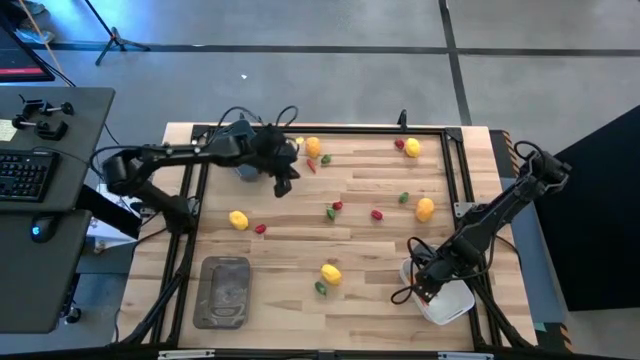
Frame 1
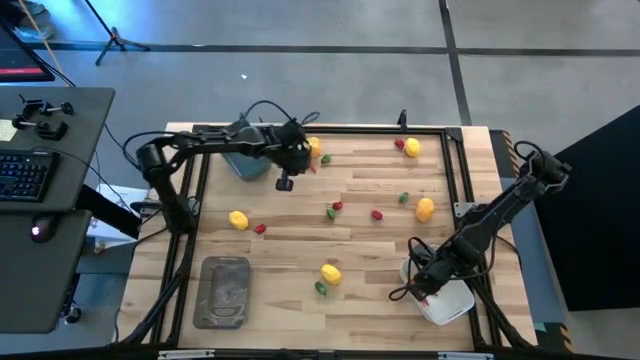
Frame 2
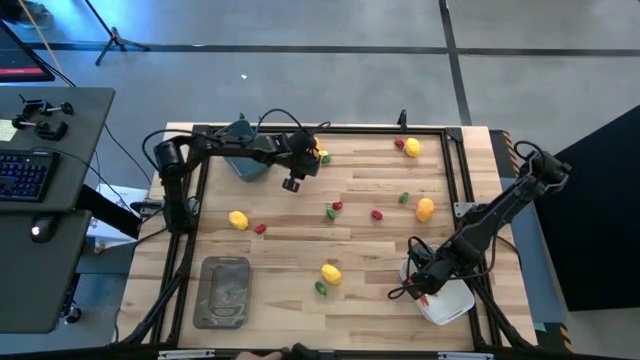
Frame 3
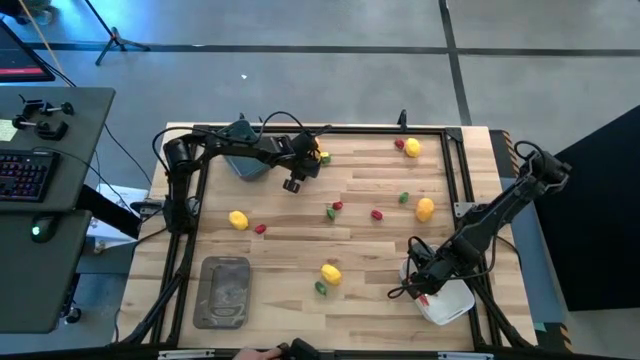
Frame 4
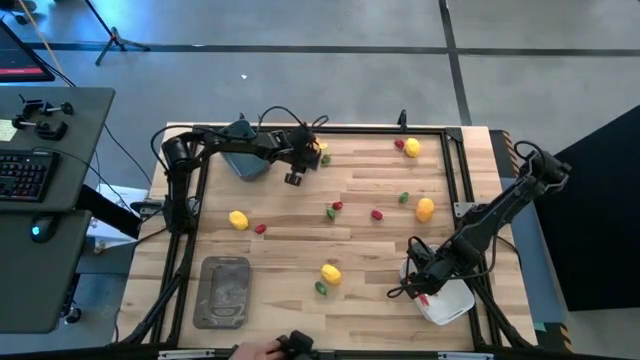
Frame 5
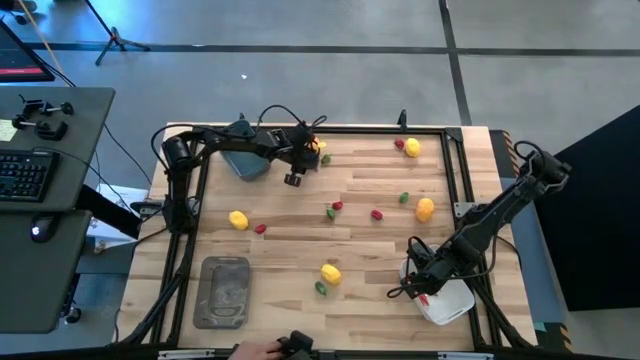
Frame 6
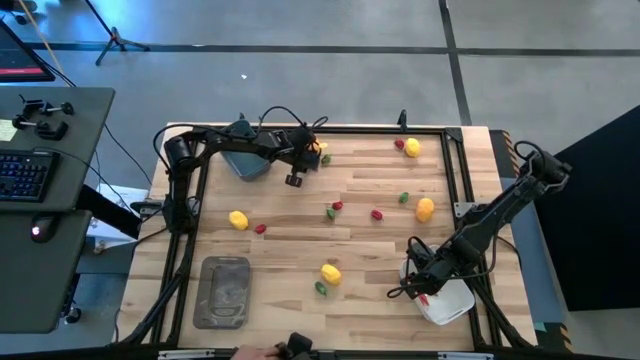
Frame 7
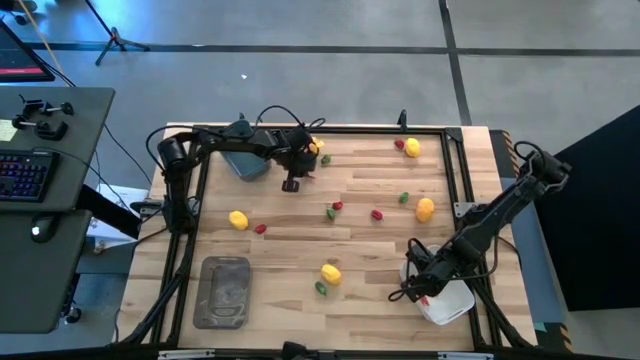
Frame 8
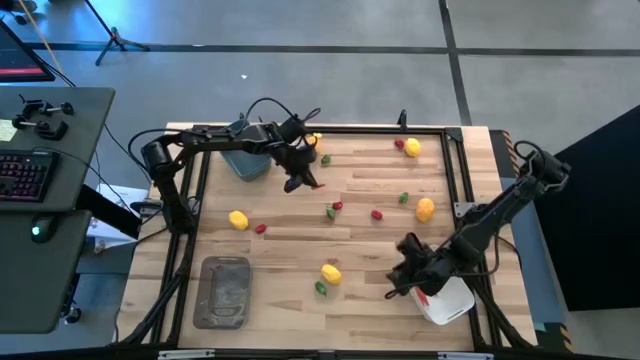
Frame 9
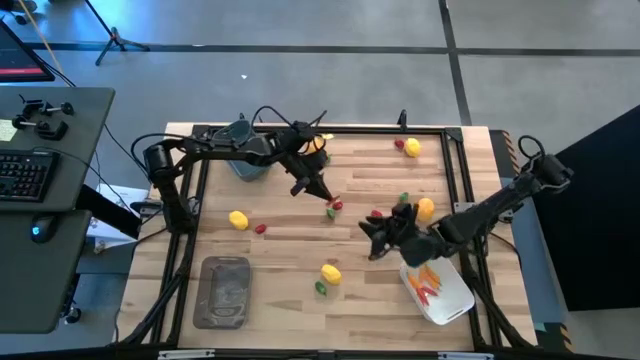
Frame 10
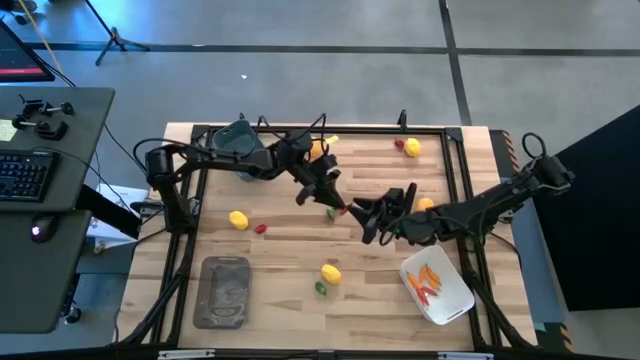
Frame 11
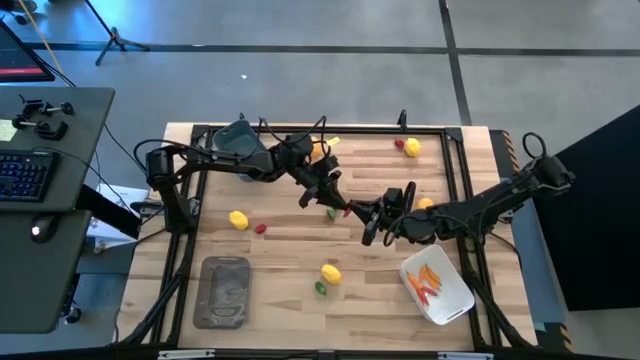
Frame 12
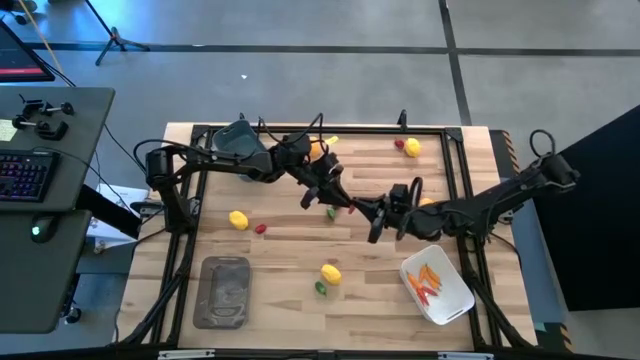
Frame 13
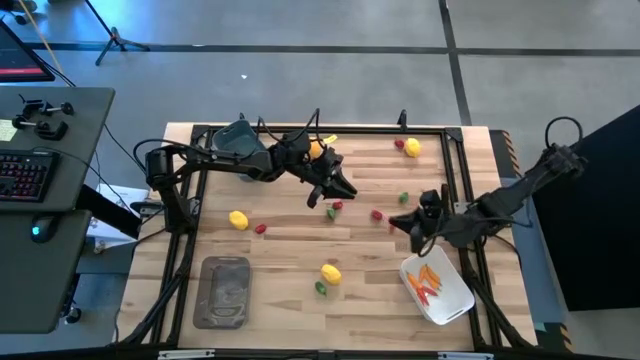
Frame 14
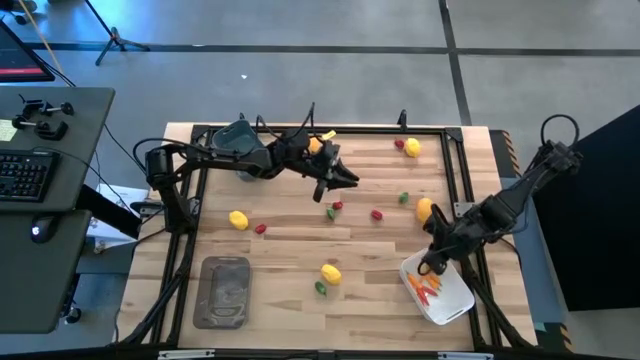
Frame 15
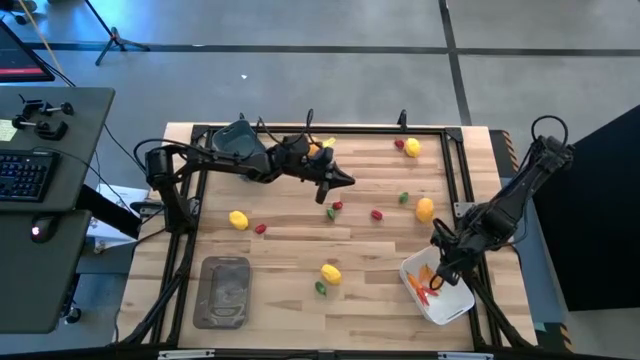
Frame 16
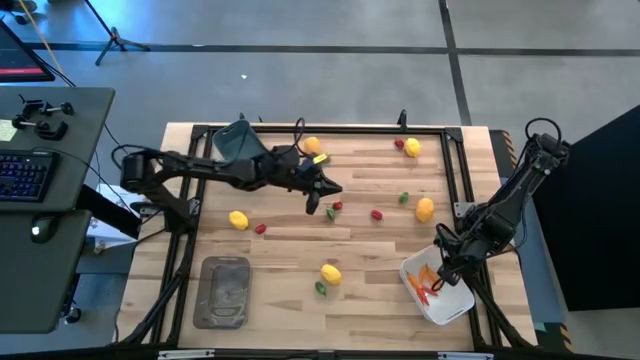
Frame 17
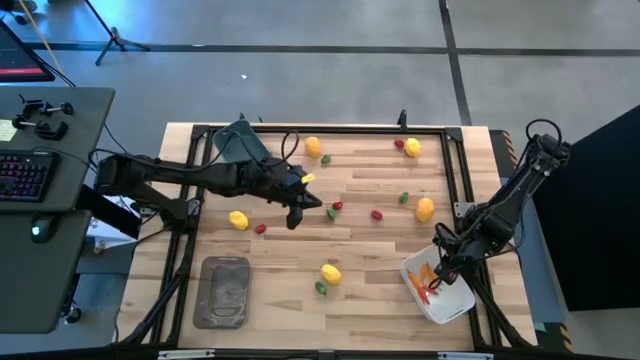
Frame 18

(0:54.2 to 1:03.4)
Task: Sort produce into baskets
Put the dark orange chili pepper into the white bin

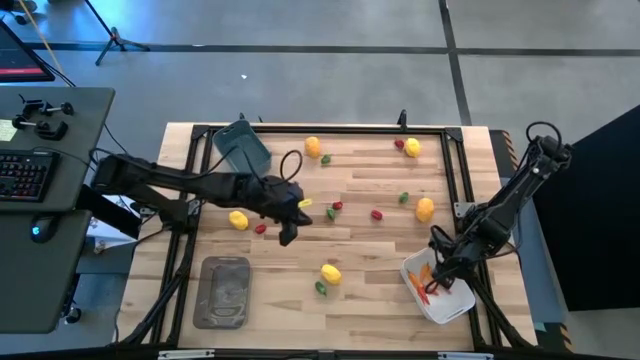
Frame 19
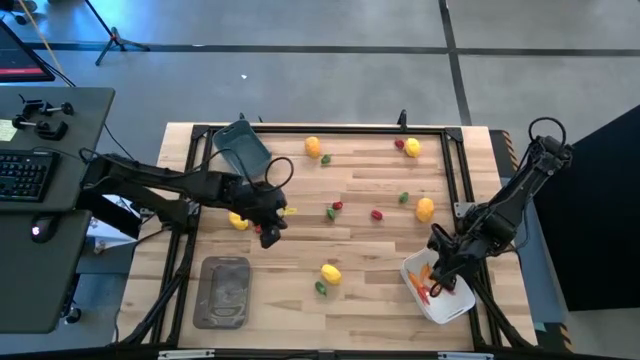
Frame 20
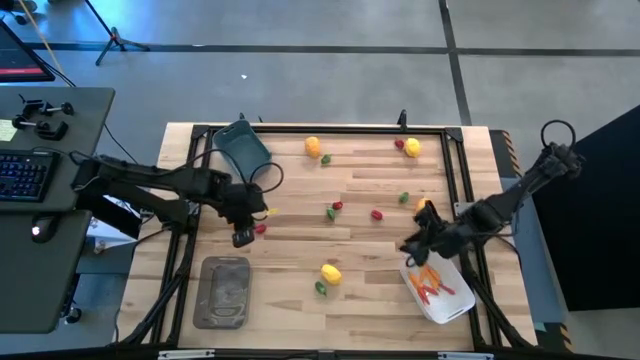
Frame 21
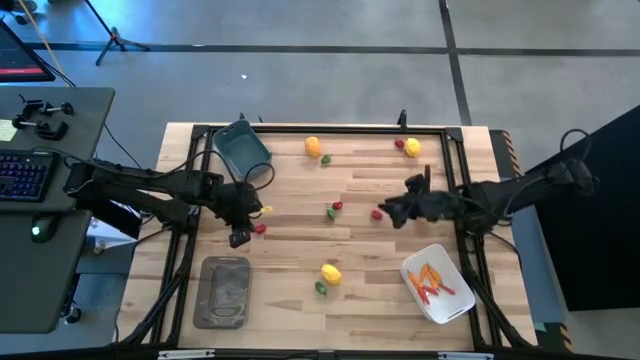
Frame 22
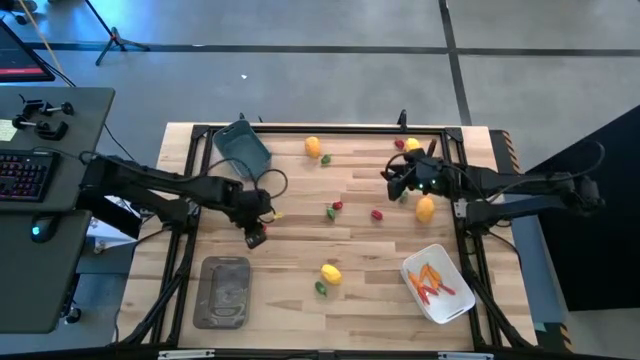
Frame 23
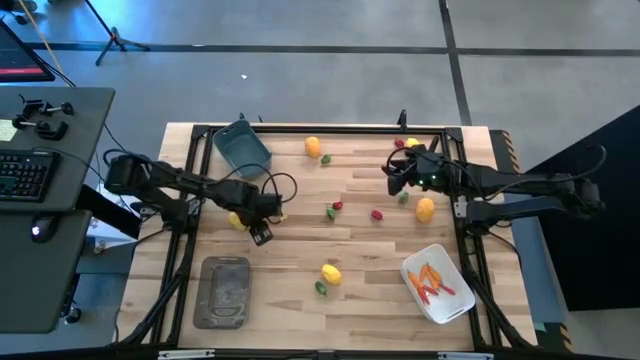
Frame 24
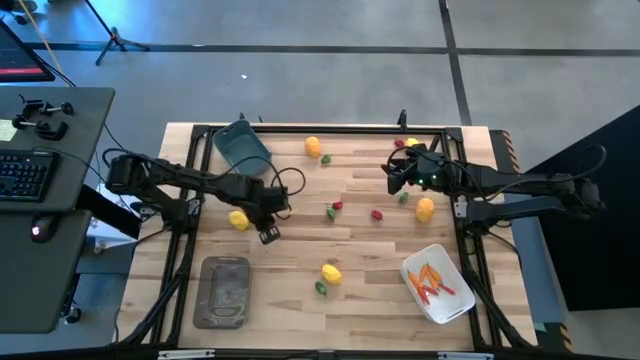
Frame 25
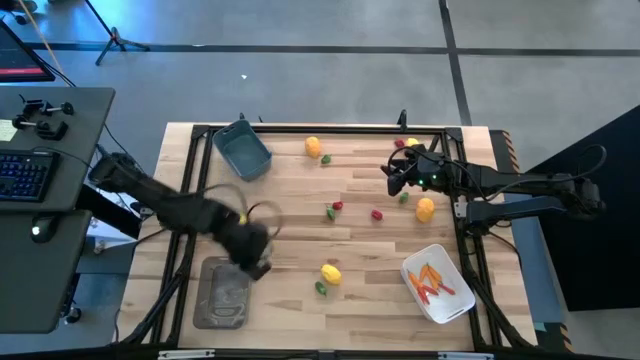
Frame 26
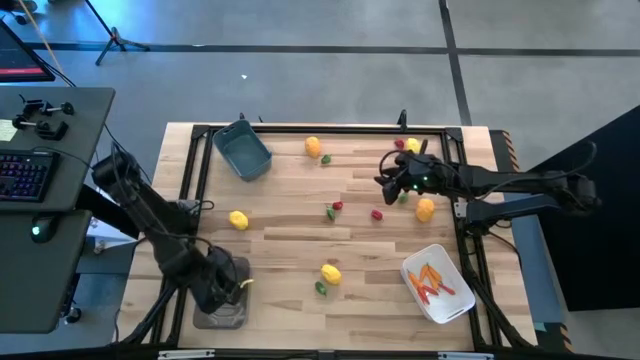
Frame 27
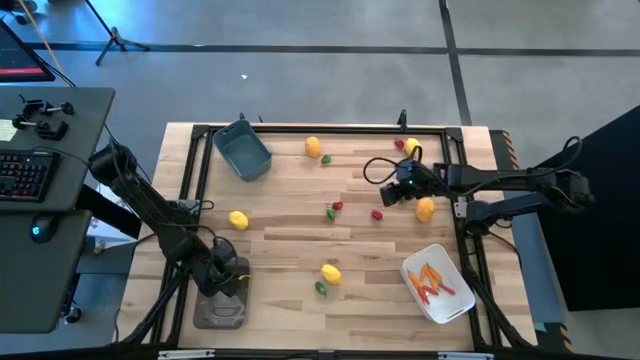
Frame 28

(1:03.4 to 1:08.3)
Put the red chili pepper into the black bin

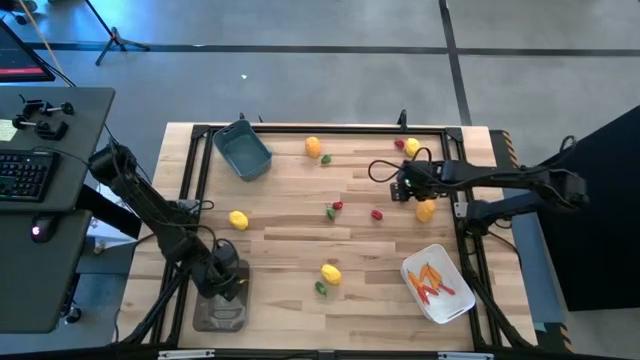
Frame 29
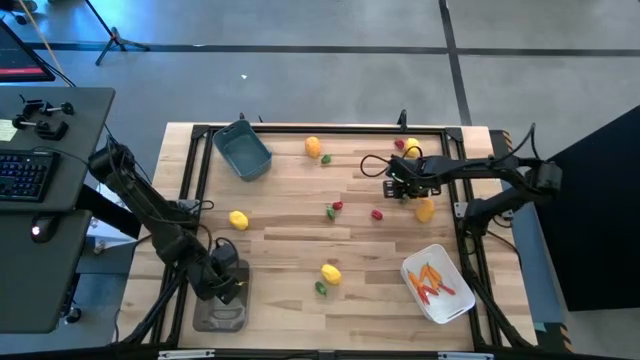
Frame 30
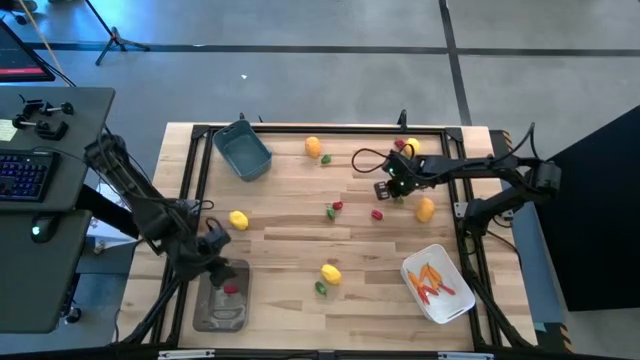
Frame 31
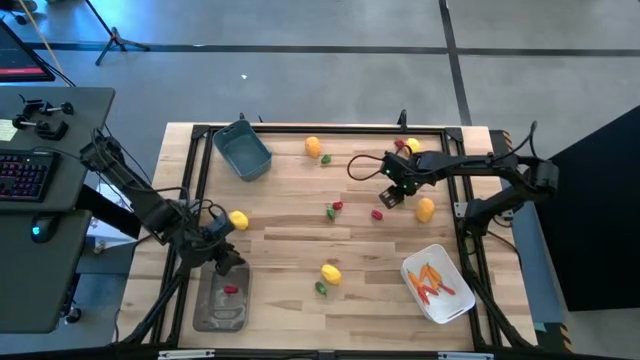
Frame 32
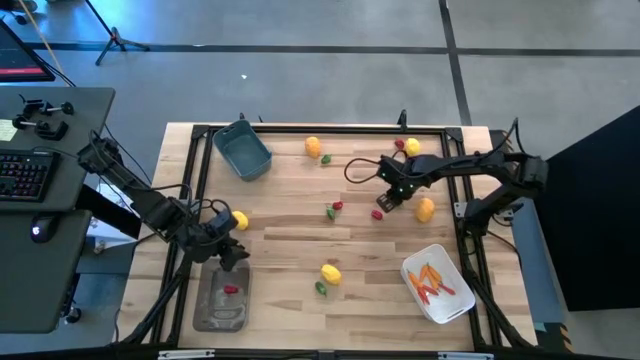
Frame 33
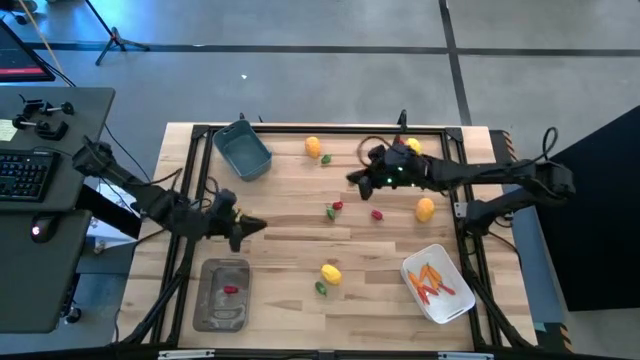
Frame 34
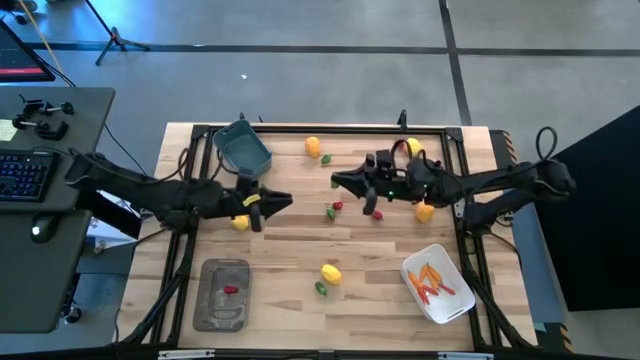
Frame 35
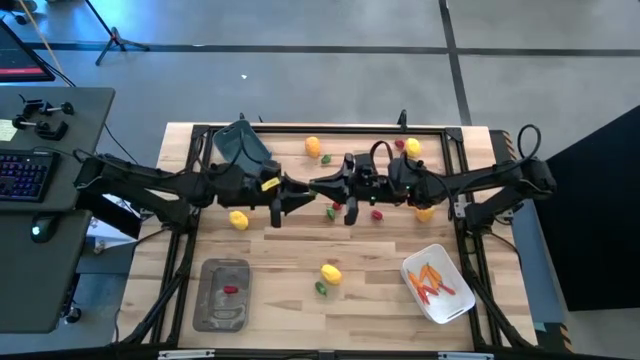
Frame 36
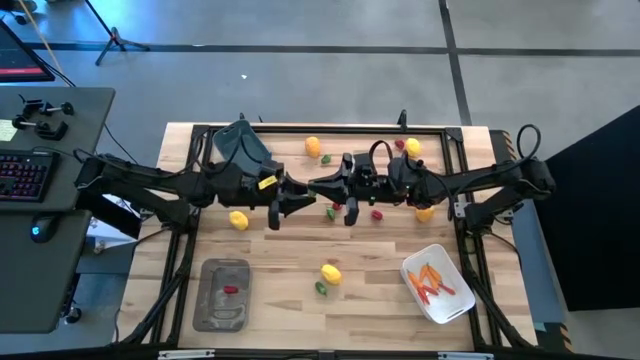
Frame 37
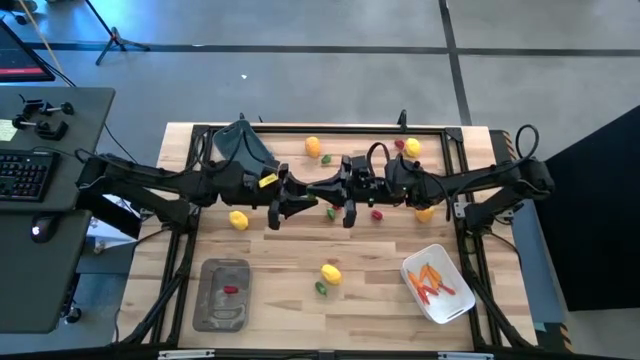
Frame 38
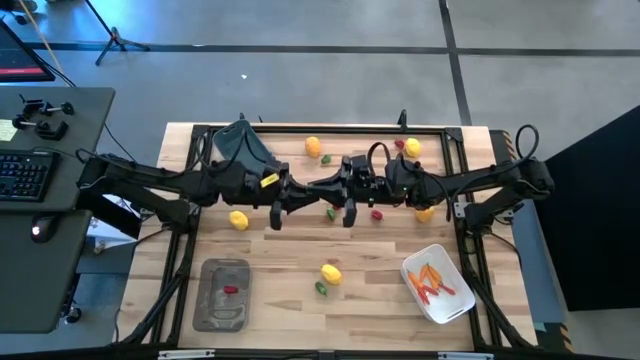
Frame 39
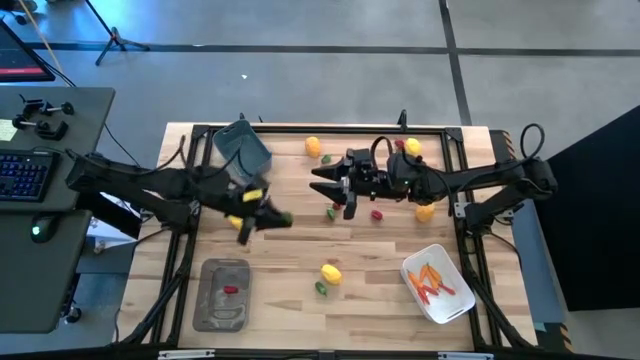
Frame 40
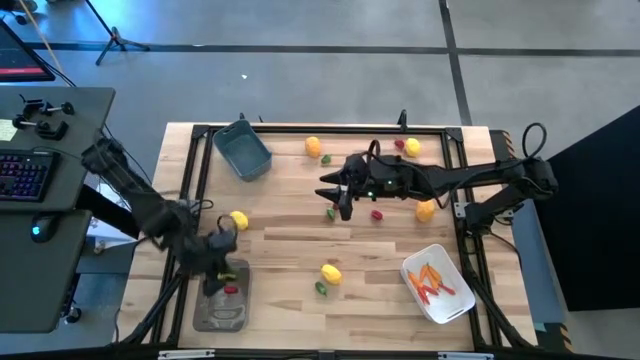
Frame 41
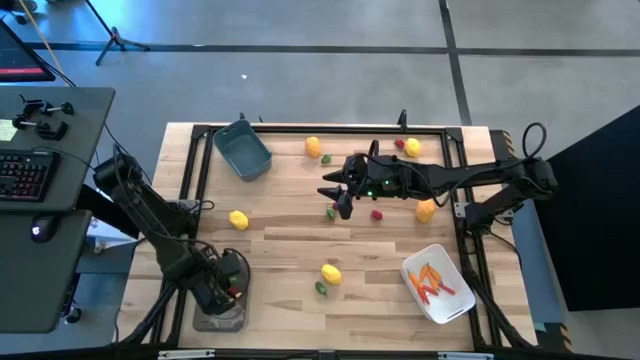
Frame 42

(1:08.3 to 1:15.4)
Put the green chili pepper into the black bin

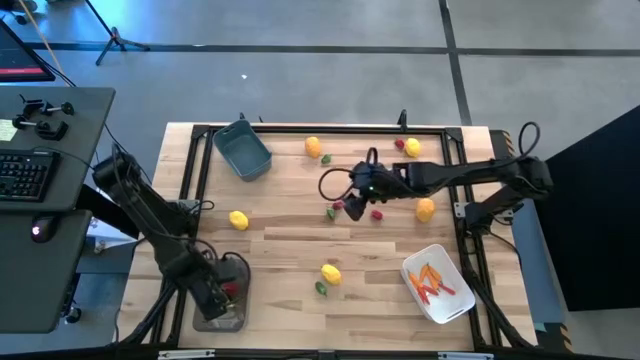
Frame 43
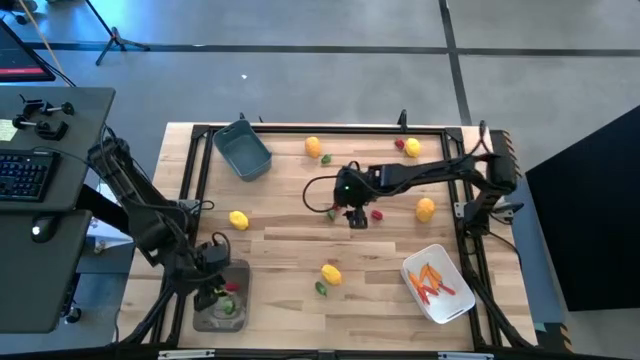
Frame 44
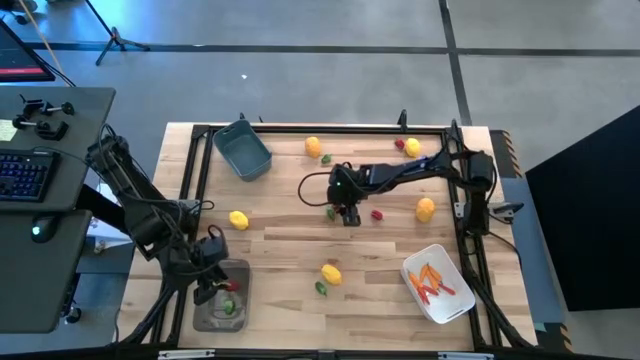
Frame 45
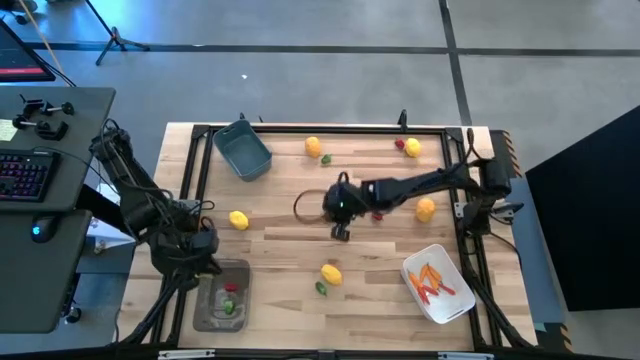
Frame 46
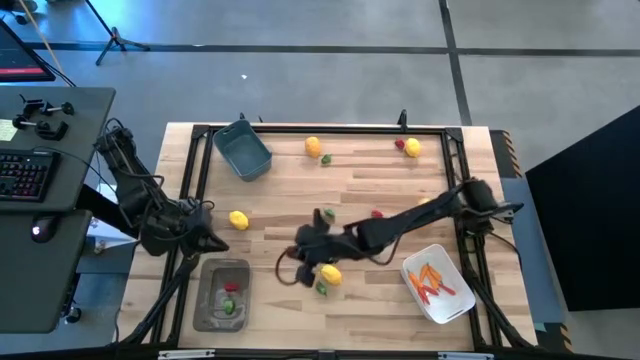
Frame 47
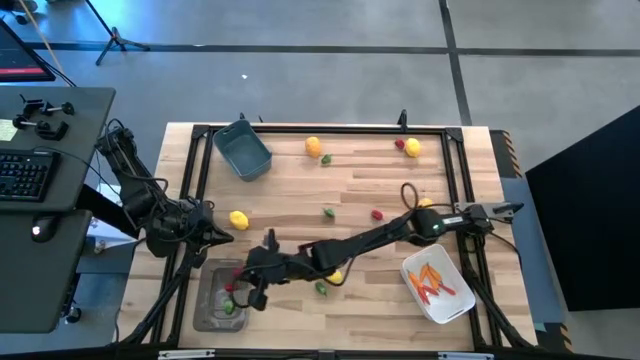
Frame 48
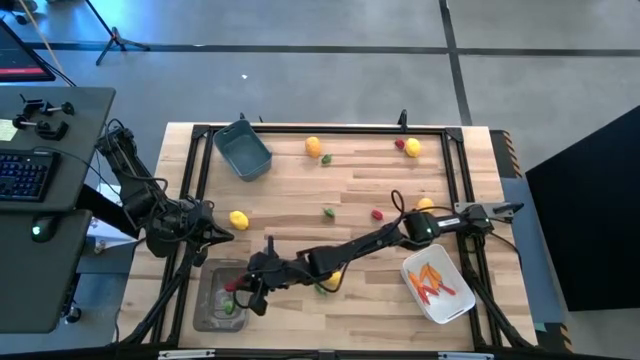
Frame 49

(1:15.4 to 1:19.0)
Put the red chili pepper into the black bin
